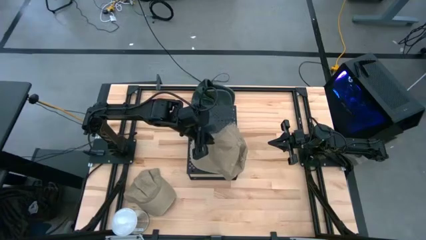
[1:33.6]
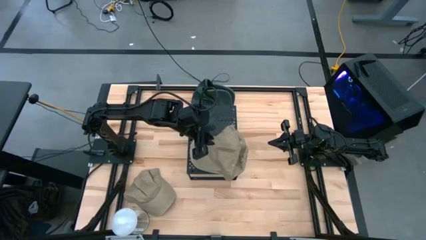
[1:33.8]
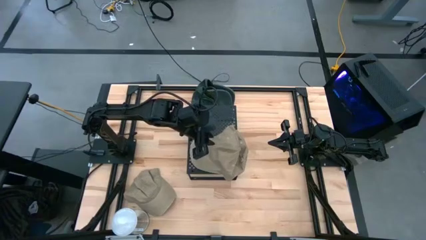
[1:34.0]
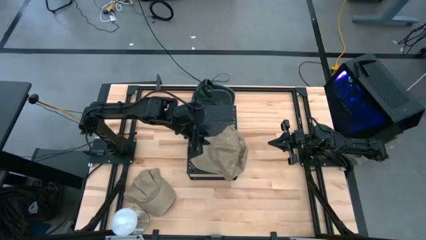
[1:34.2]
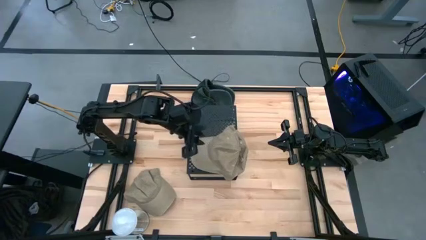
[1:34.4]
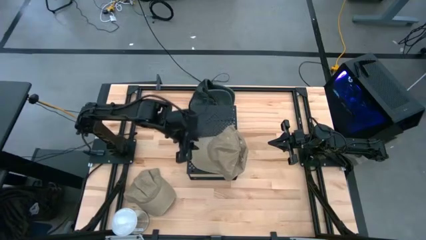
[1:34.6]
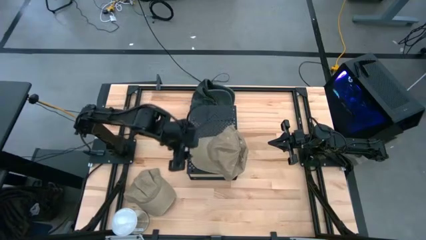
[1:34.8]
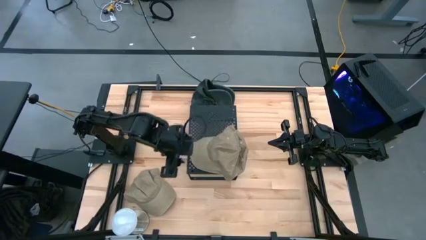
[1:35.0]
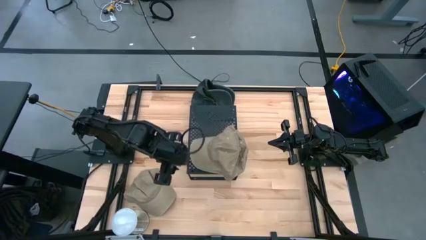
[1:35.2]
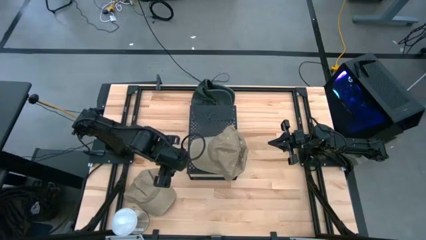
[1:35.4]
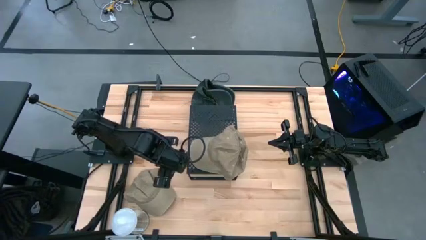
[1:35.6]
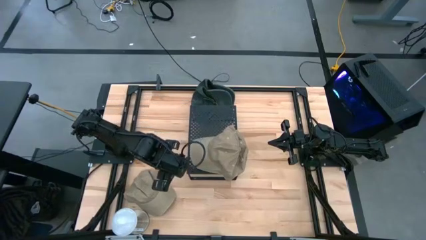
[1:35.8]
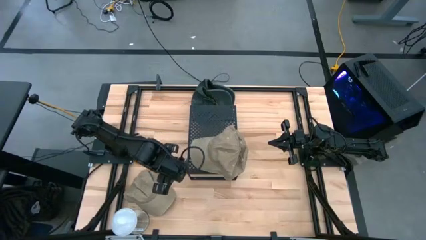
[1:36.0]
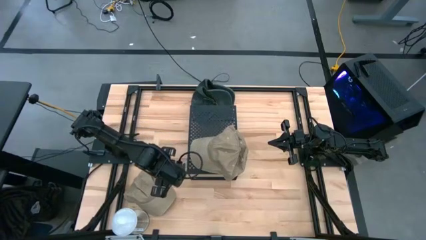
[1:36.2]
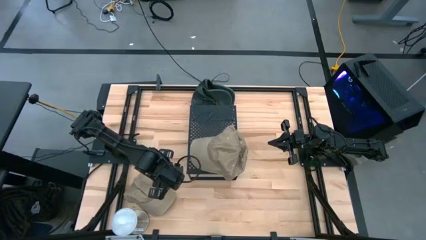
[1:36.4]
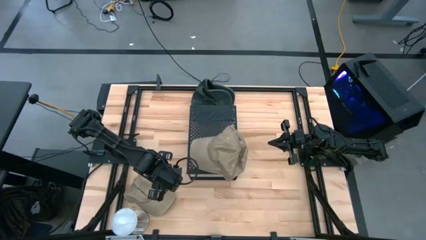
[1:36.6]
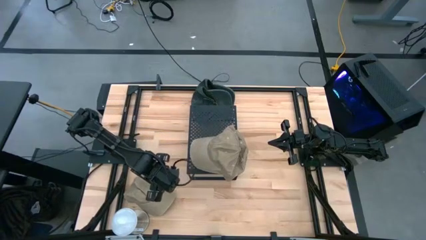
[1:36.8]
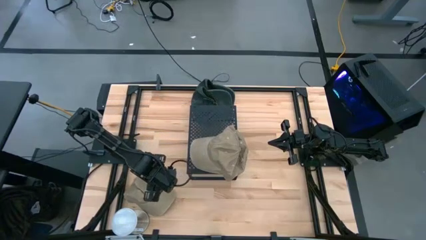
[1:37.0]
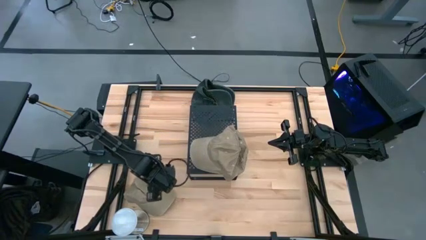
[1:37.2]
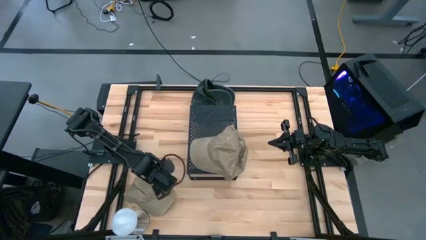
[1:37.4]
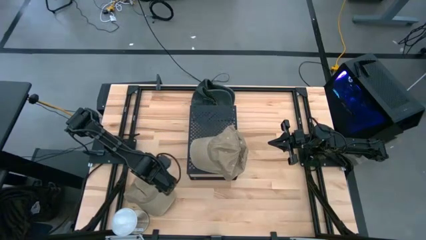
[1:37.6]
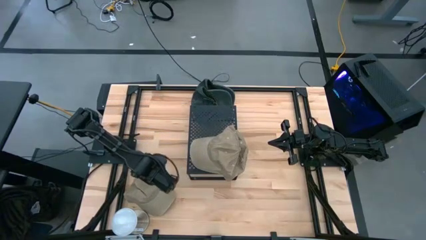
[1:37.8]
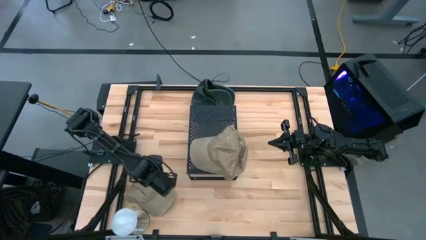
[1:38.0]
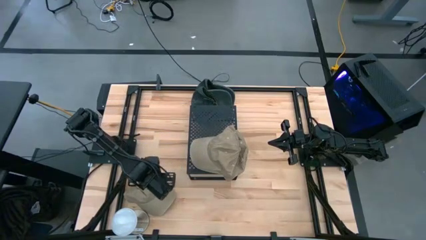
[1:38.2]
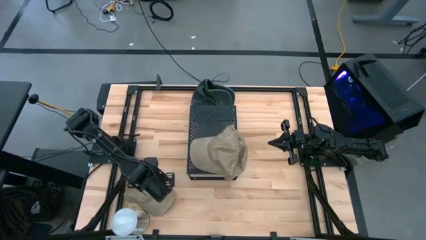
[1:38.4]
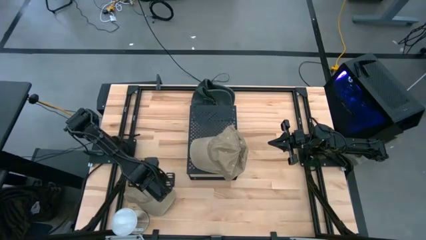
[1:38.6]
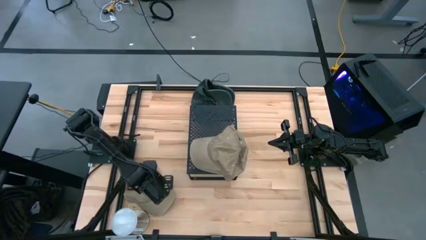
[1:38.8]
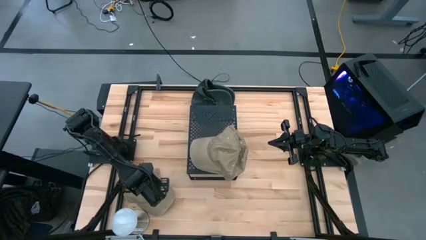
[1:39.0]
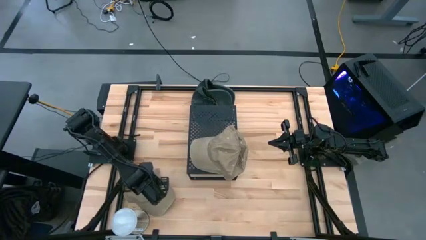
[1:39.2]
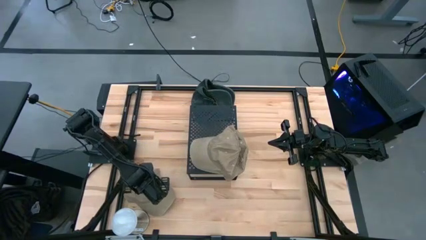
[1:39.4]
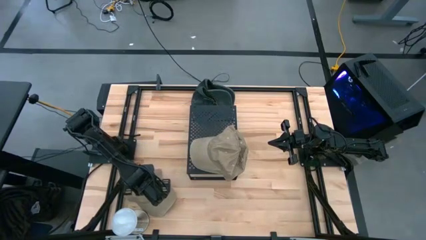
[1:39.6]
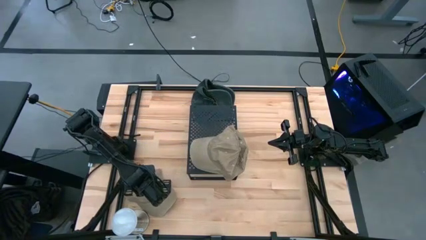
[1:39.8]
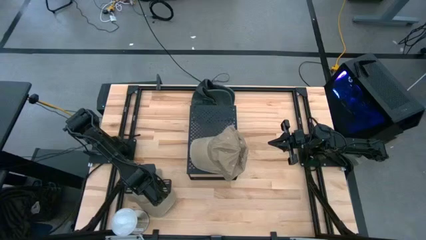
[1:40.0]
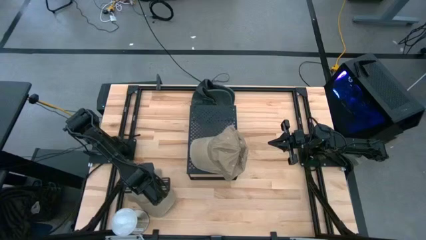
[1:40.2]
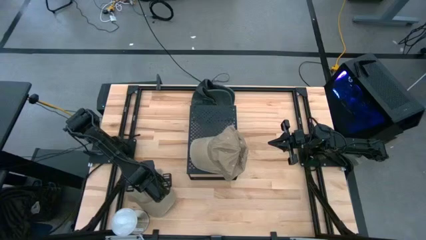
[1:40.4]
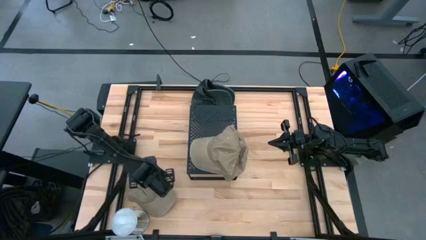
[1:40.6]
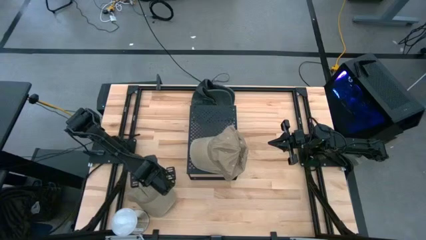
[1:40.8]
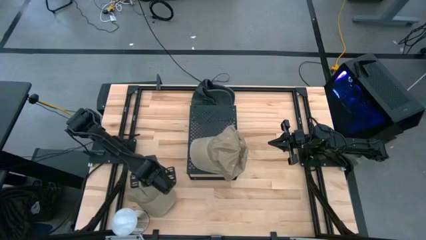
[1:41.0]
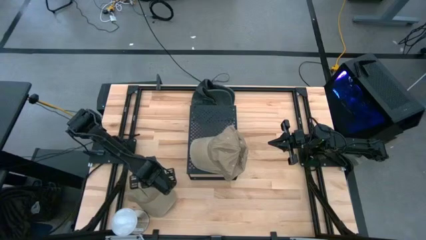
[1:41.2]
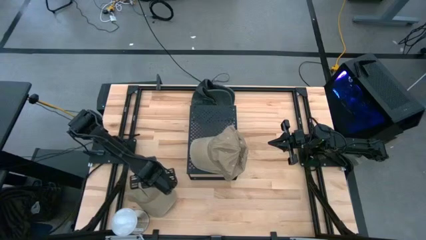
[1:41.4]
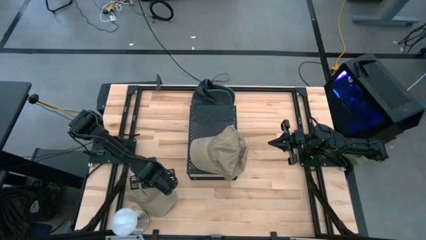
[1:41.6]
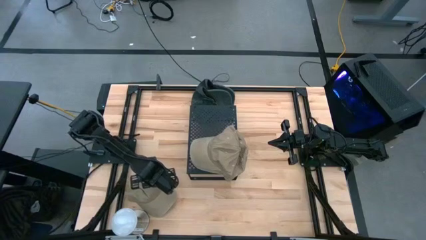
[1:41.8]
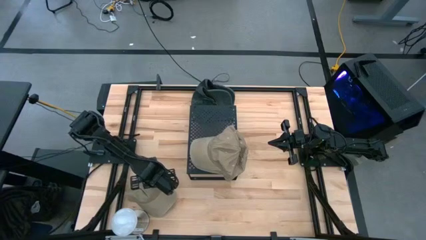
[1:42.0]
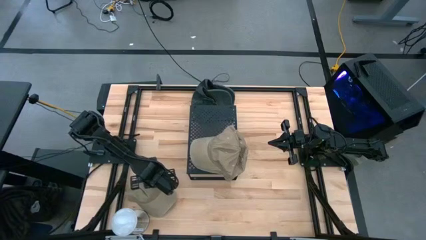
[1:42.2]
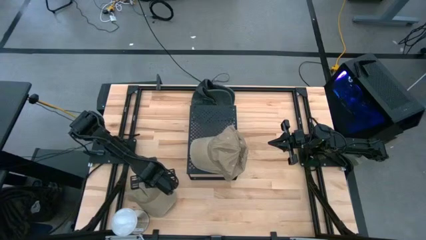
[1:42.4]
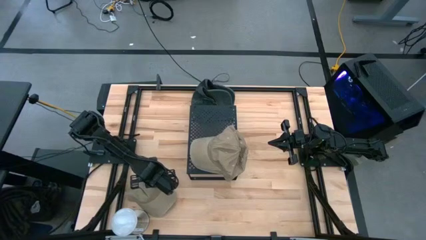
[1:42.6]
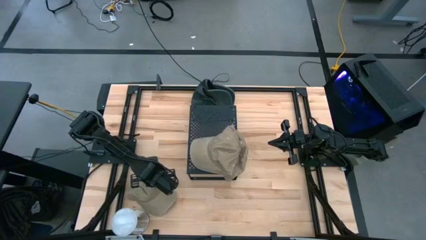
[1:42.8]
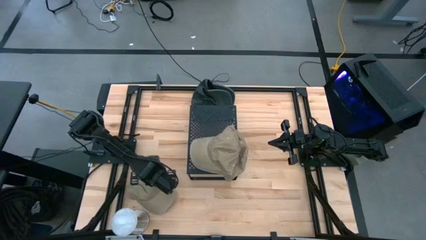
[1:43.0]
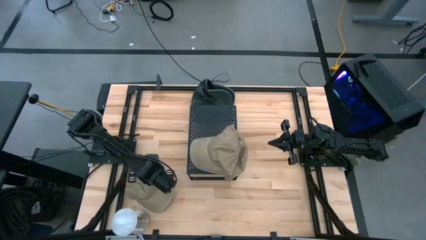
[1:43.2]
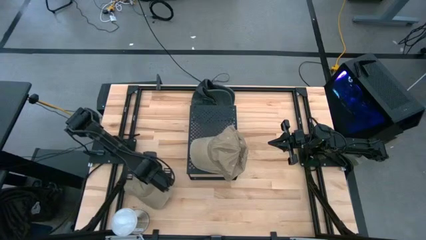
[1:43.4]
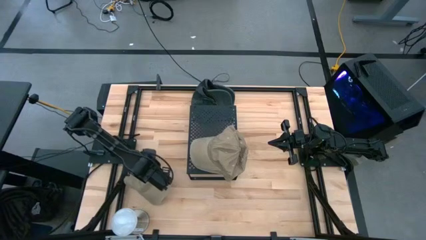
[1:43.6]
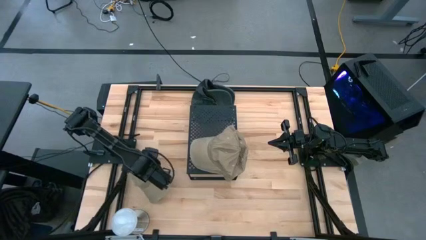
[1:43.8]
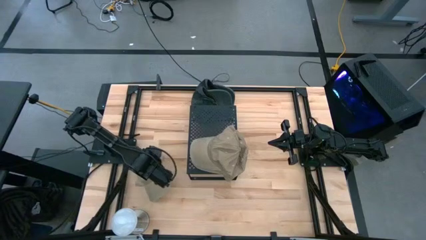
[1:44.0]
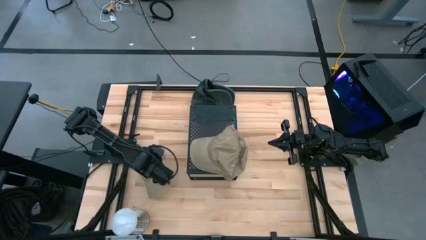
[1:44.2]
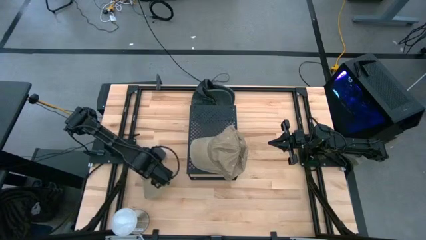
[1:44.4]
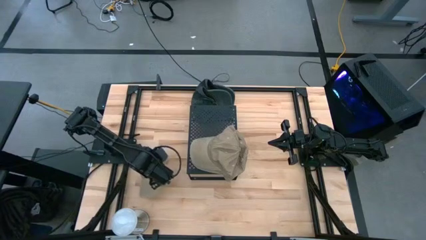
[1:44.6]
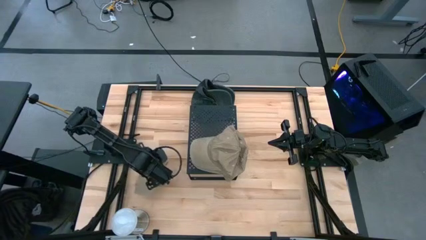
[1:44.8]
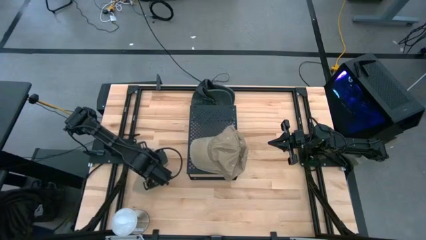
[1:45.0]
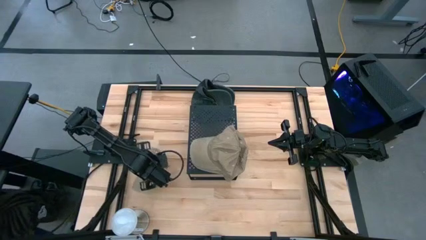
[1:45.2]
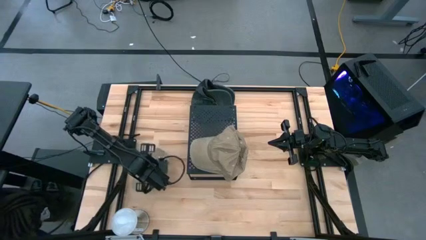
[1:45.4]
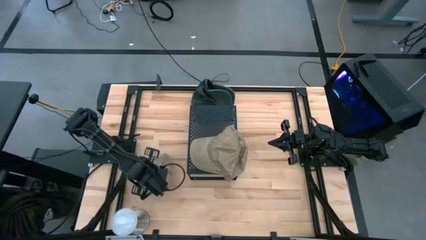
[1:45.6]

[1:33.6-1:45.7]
Task: Pick & Place hat
Stack the brown cap on top of the other brown cap on the shelf
